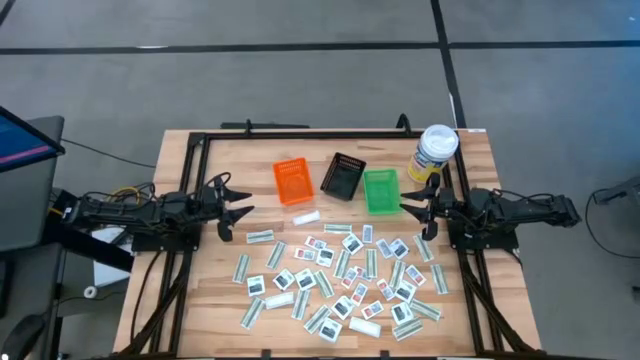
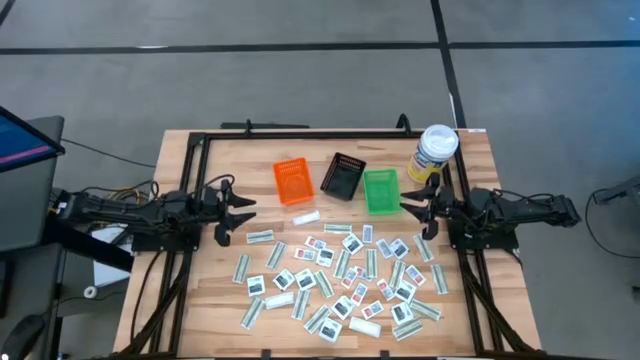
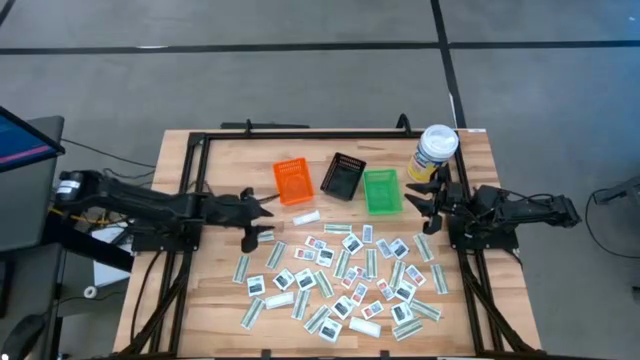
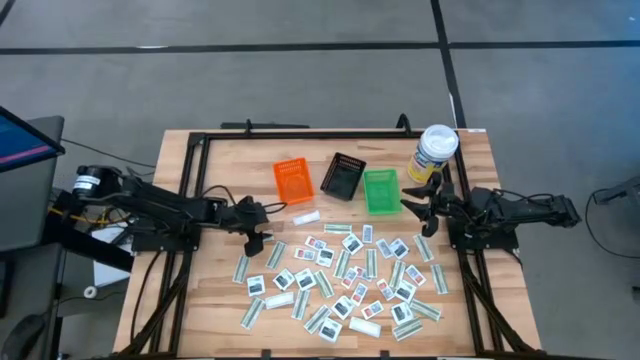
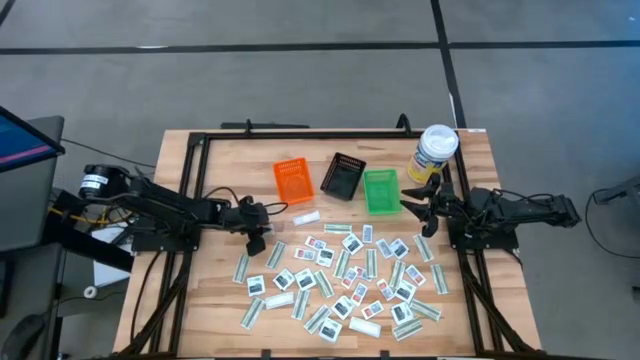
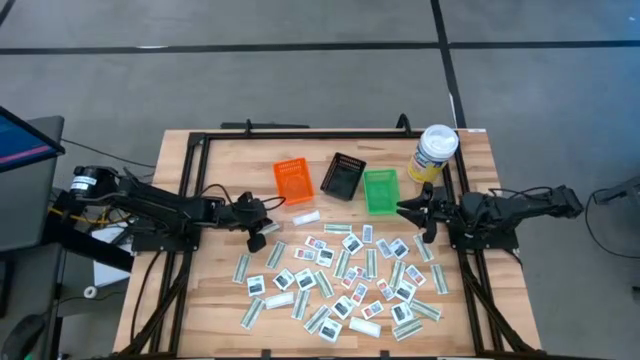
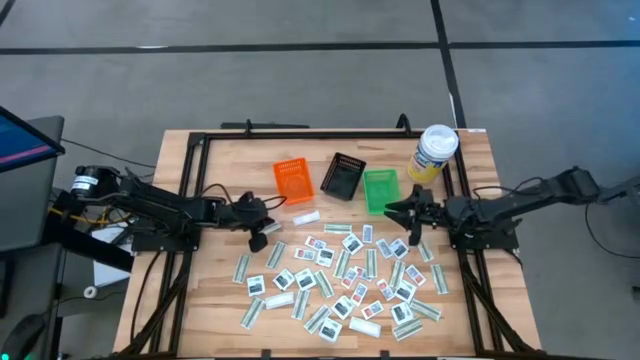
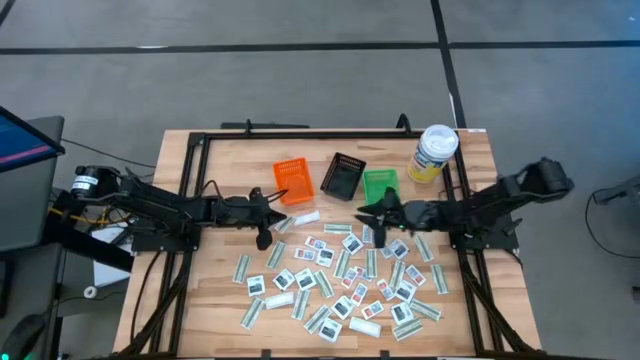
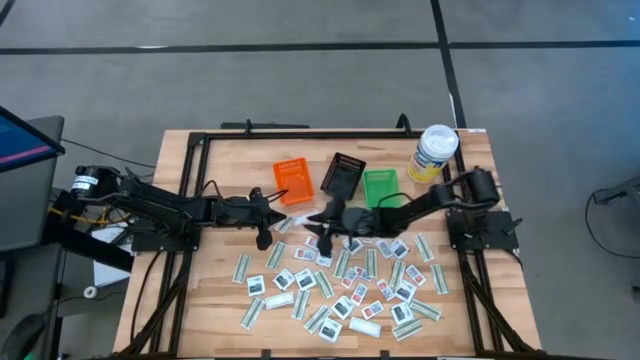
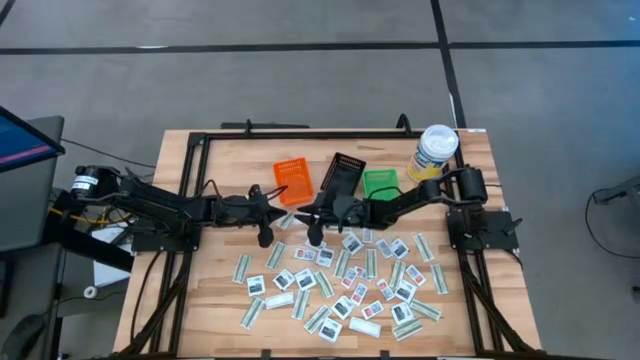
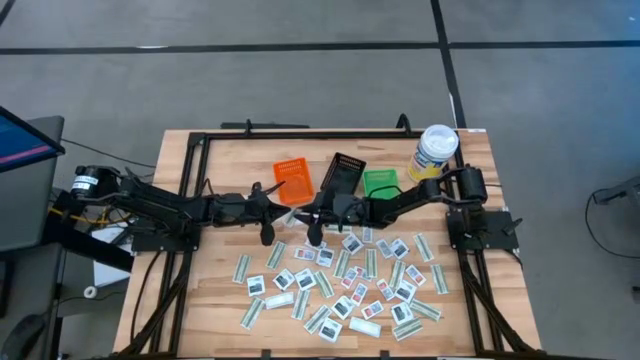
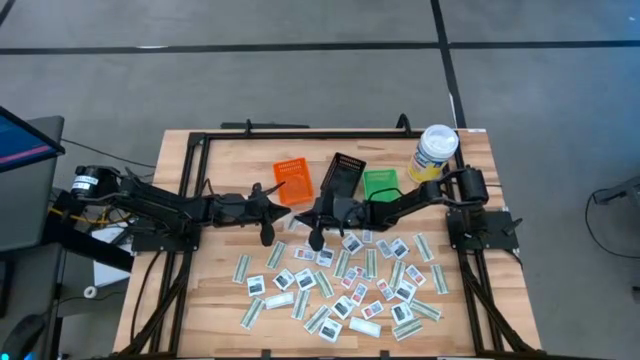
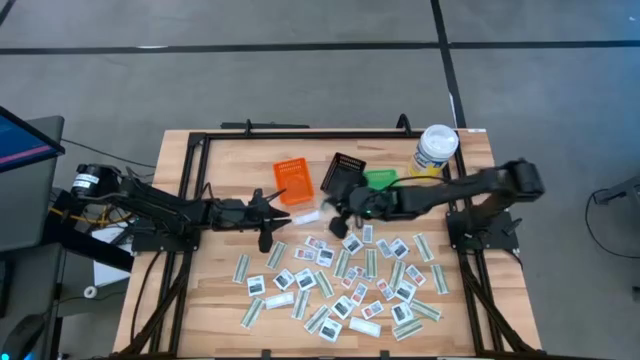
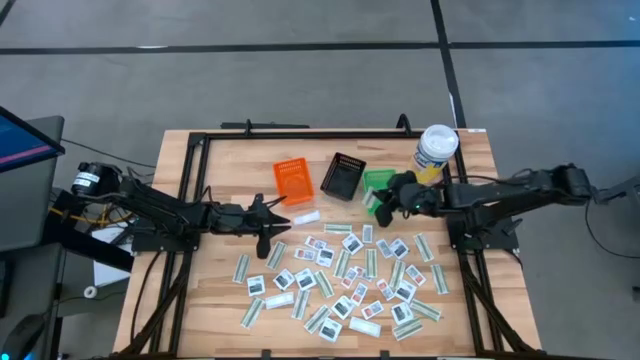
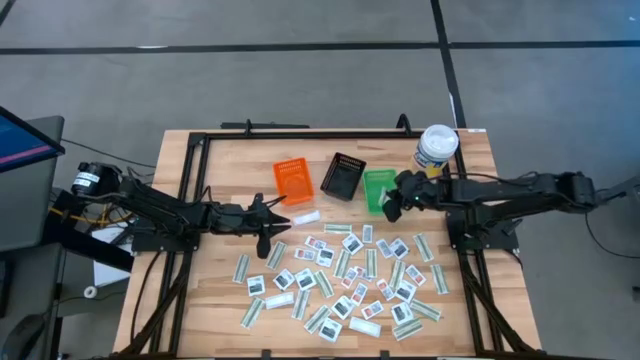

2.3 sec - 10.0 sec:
Task: Pick & Place First Aid Supplies
Put the green bandage pack into the green basket

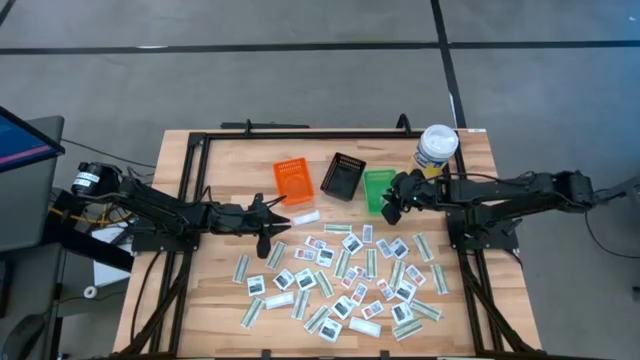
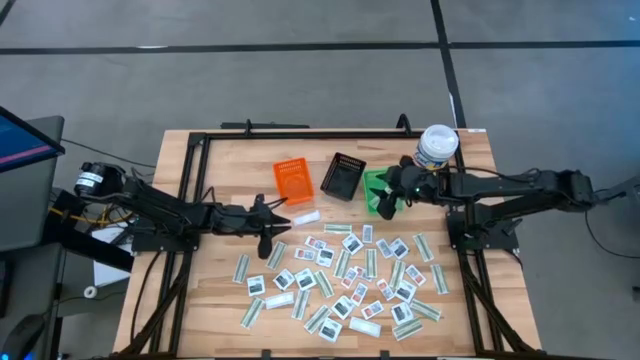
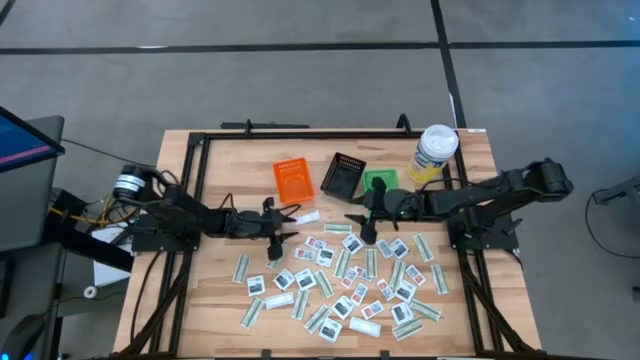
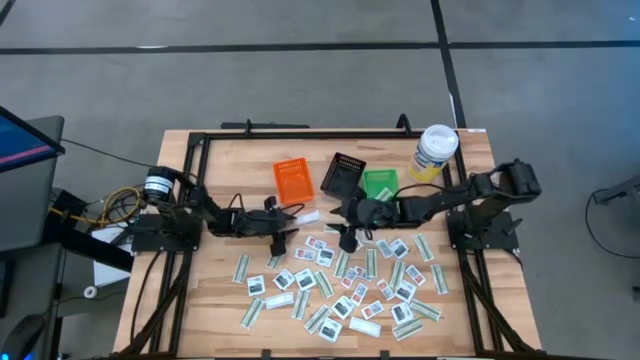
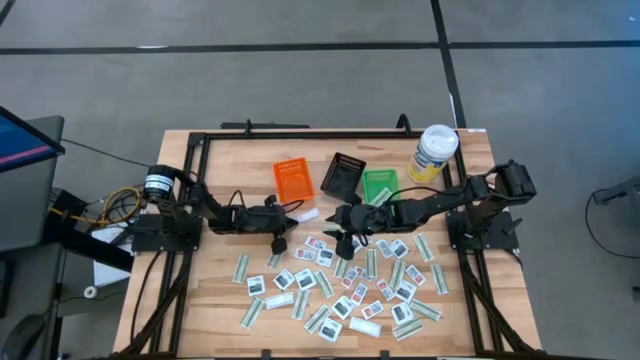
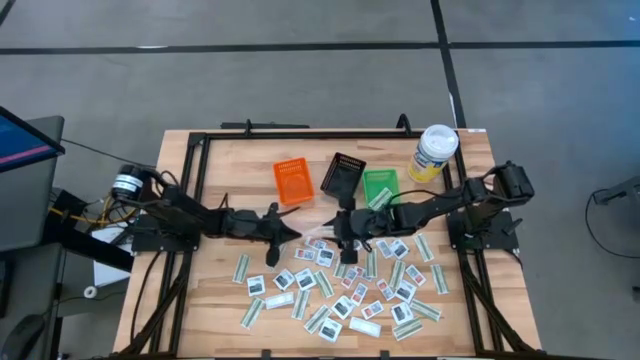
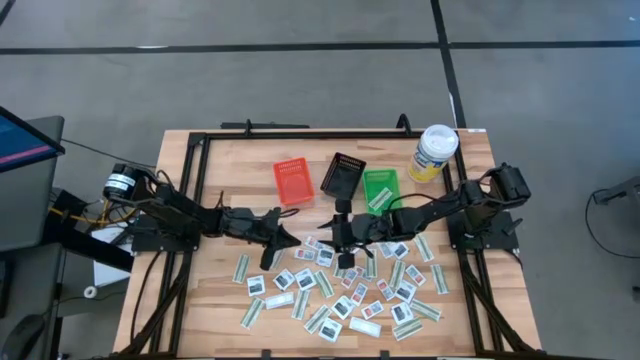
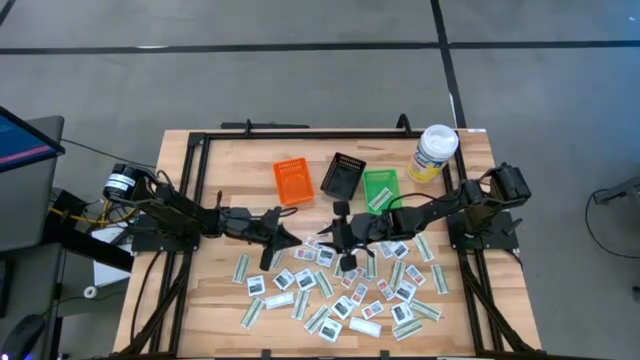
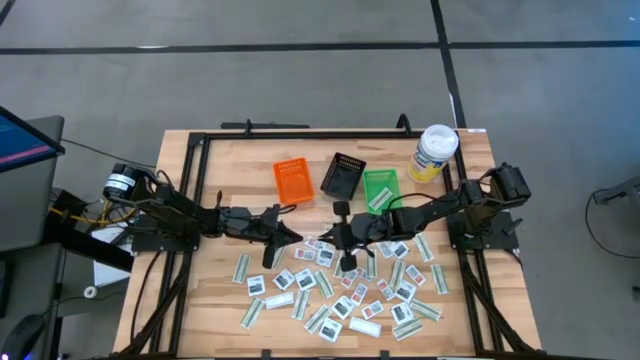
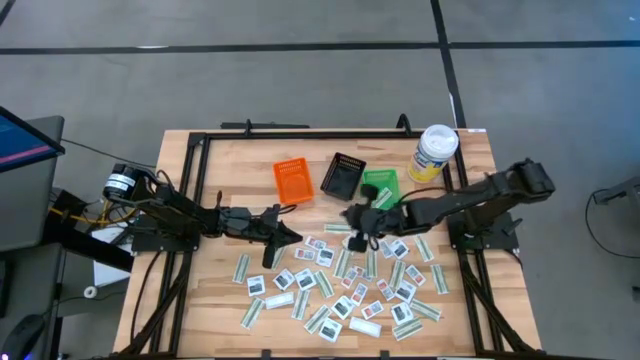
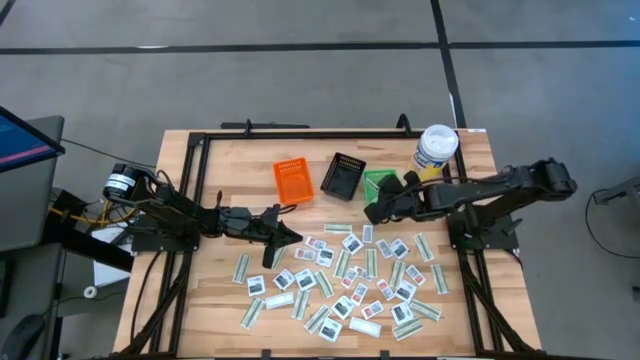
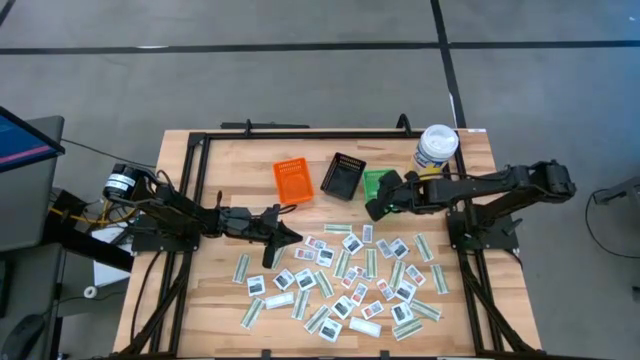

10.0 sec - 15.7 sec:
Put the green bandage pack into the green basket

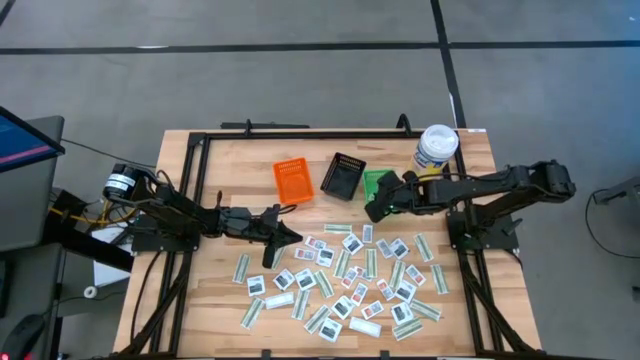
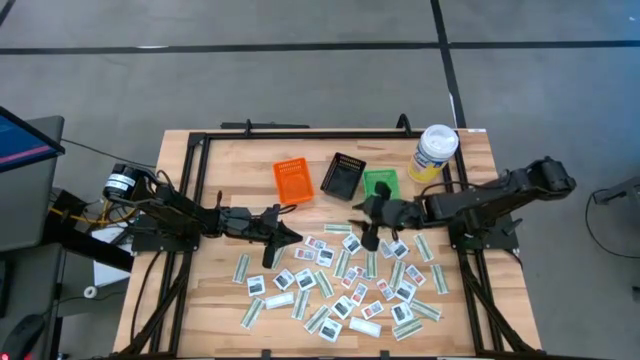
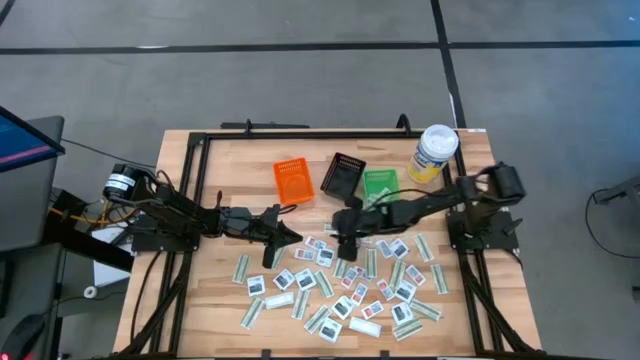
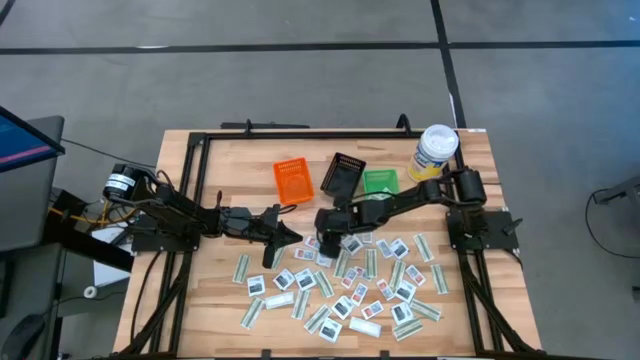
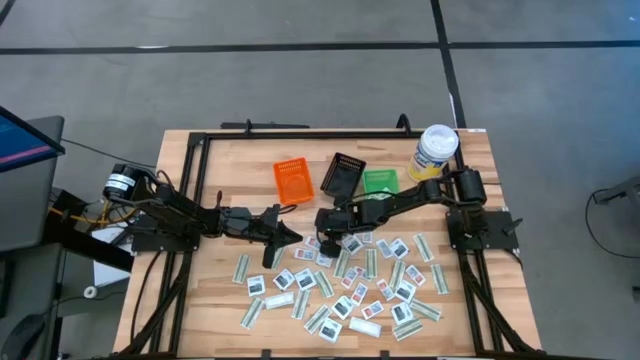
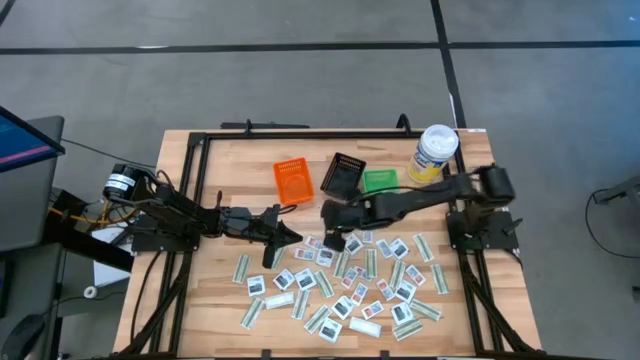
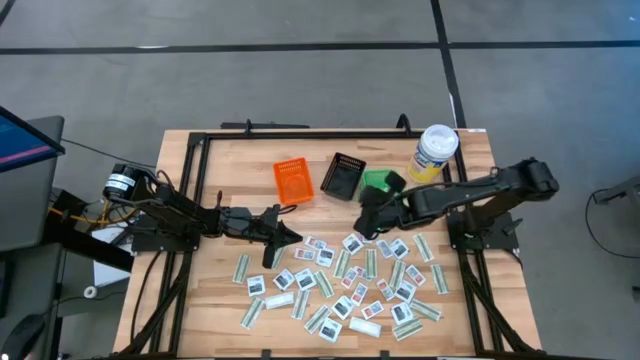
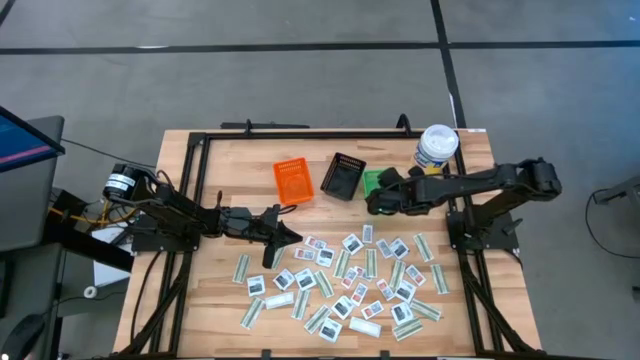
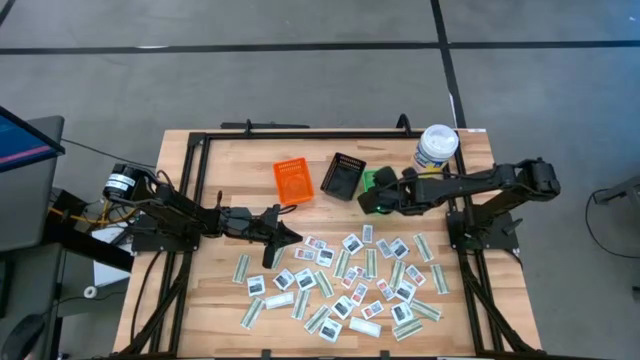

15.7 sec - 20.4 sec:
Put the green bandage pack into the green basket

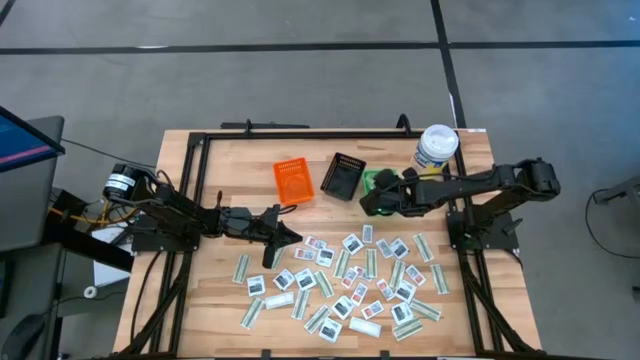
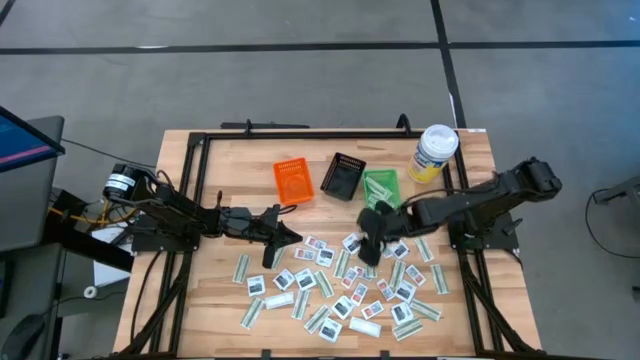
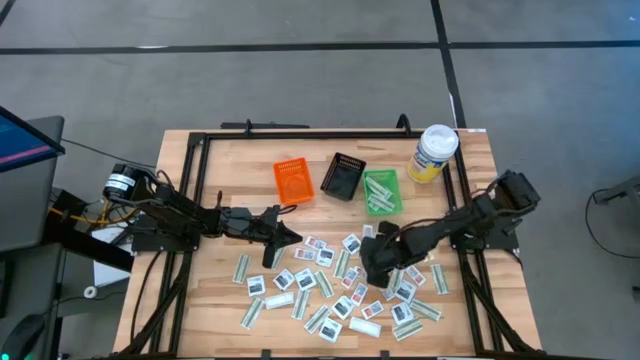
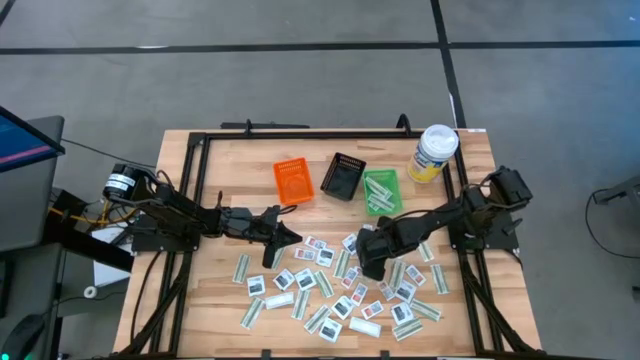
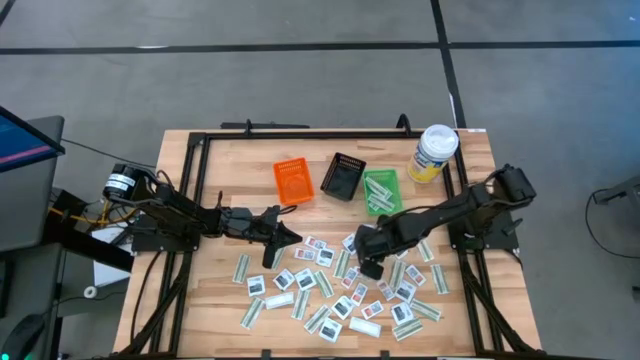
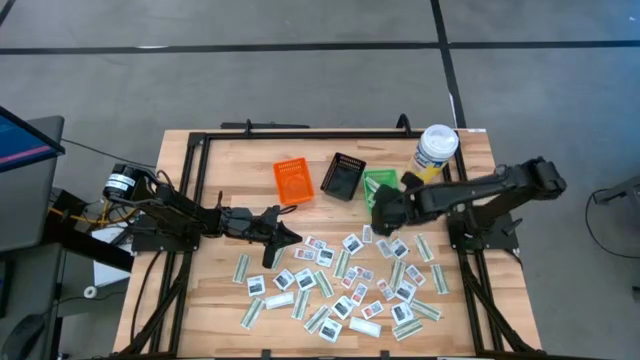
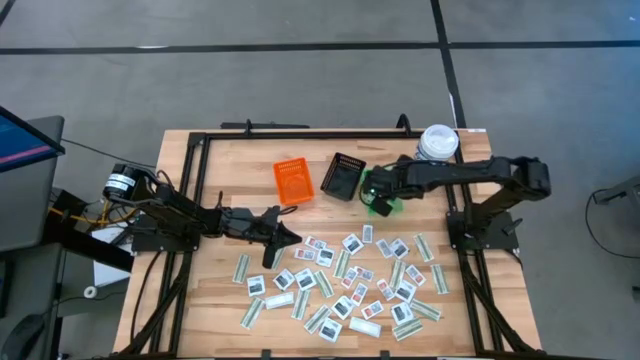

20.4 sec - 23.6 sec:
Put the green bandage pack into the green basket
